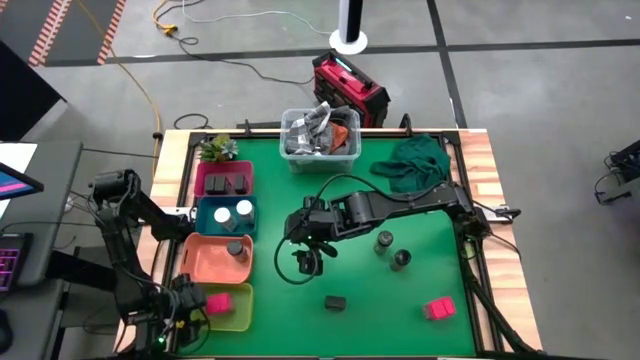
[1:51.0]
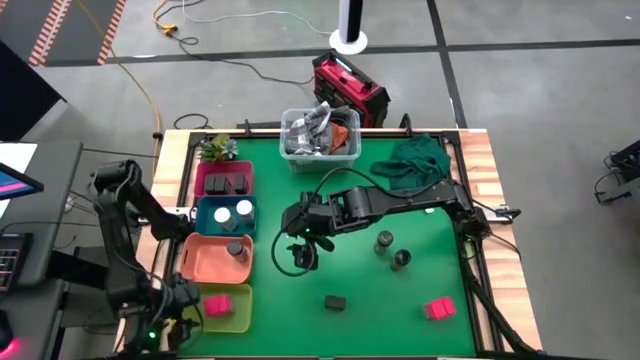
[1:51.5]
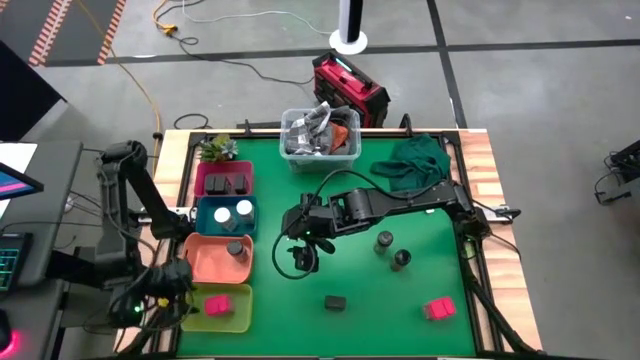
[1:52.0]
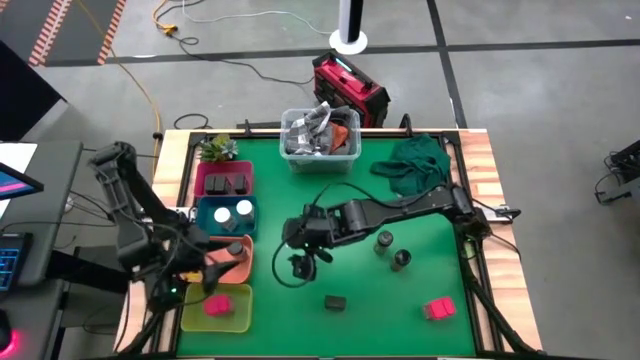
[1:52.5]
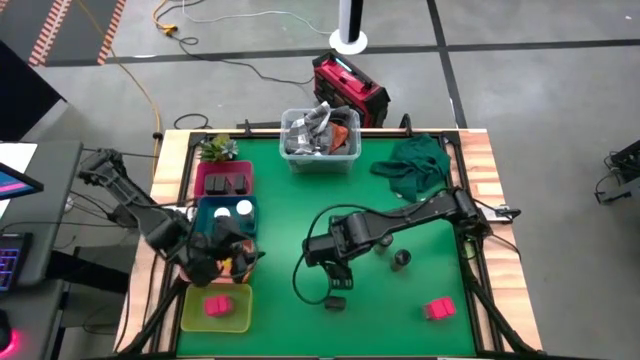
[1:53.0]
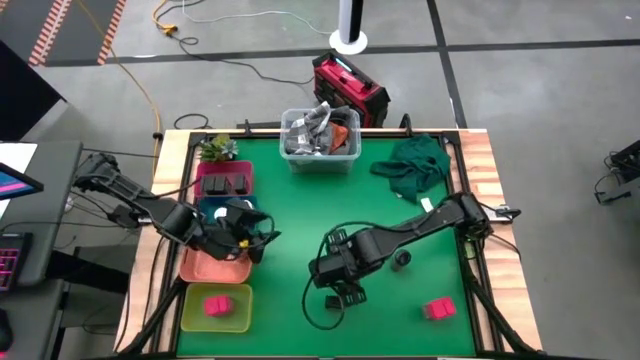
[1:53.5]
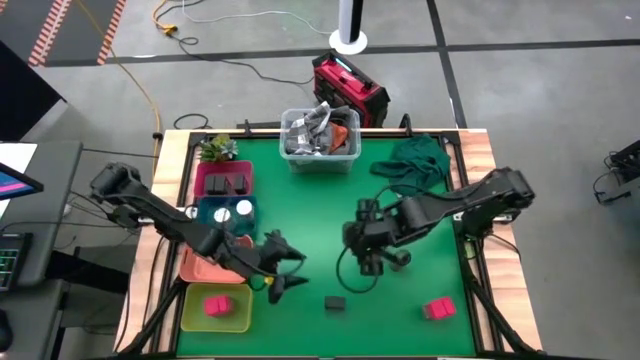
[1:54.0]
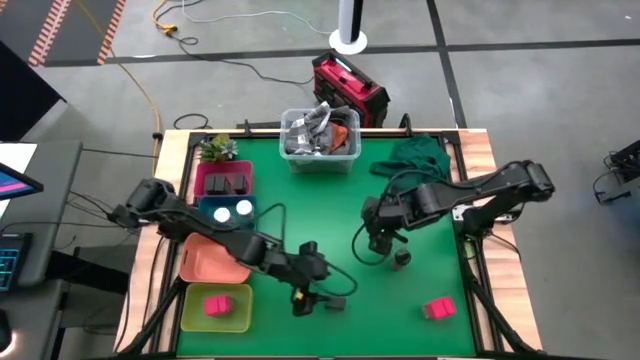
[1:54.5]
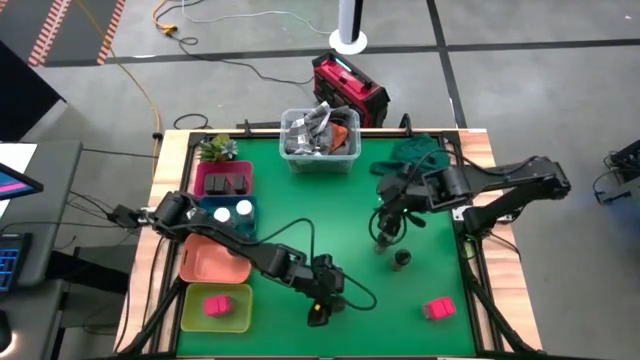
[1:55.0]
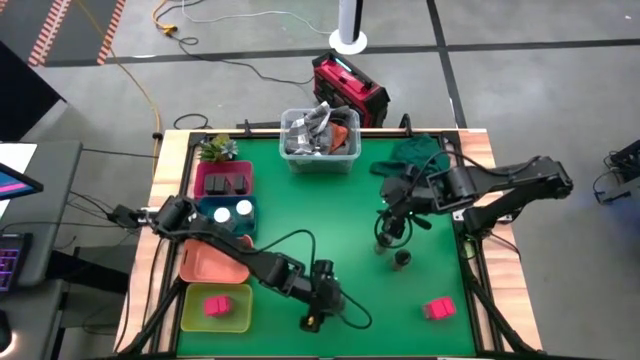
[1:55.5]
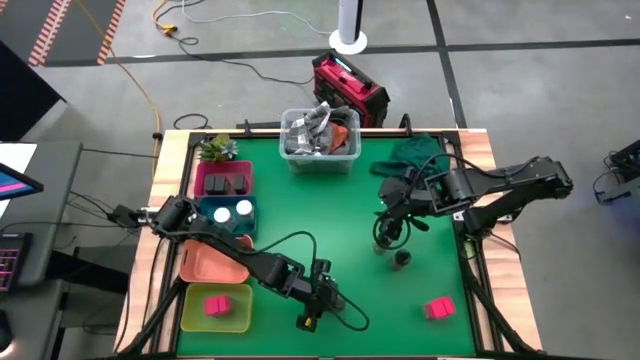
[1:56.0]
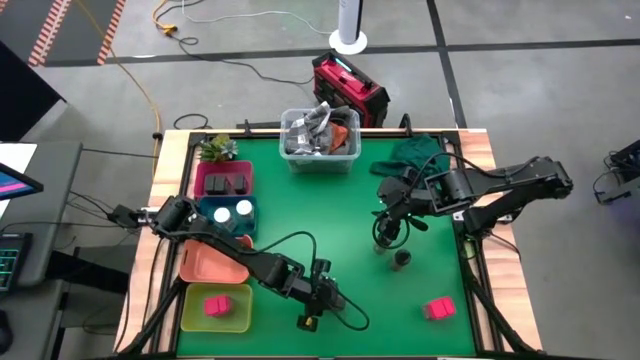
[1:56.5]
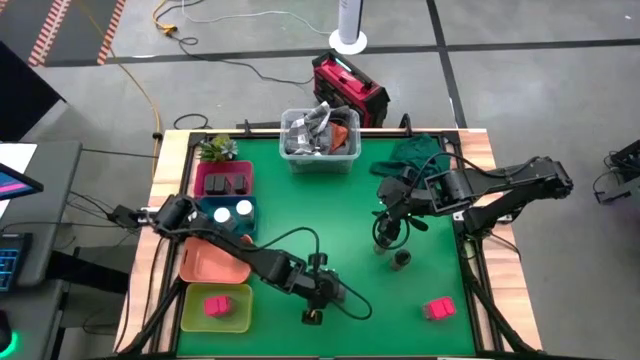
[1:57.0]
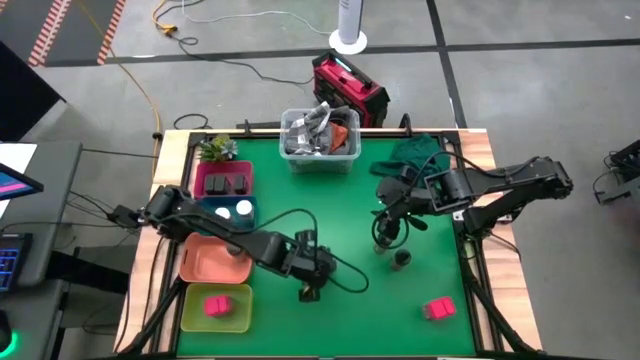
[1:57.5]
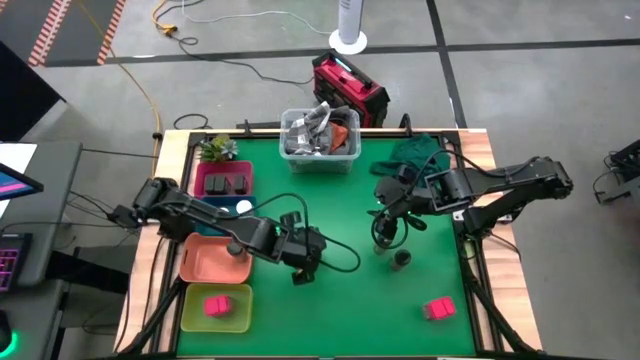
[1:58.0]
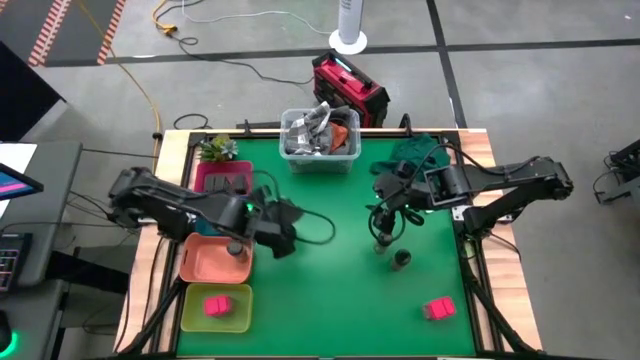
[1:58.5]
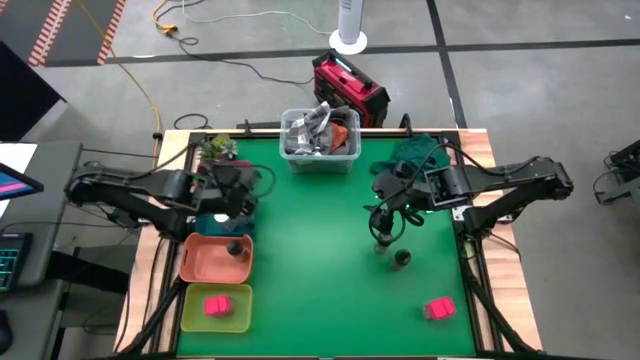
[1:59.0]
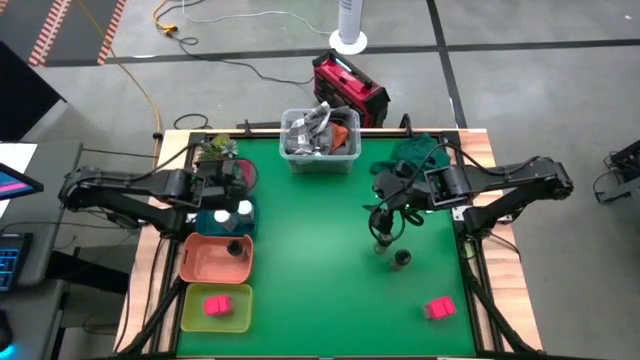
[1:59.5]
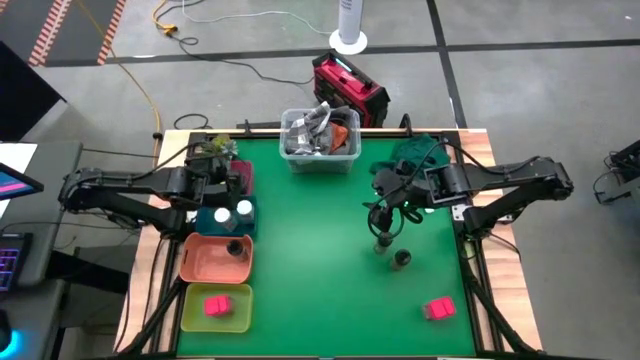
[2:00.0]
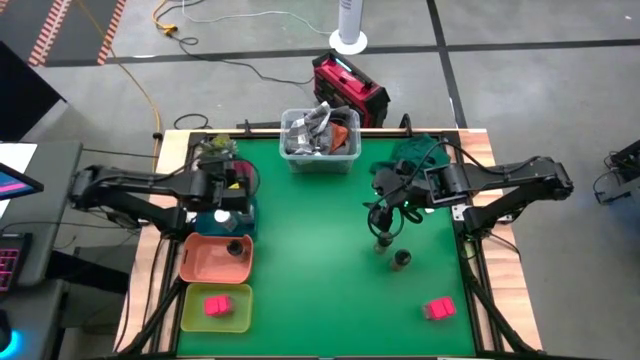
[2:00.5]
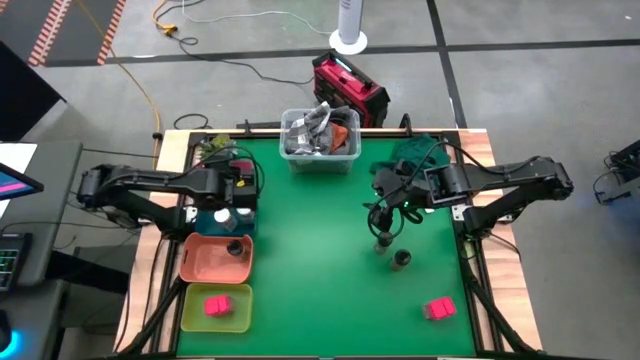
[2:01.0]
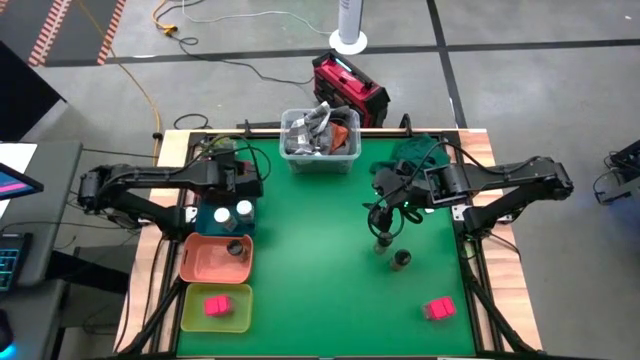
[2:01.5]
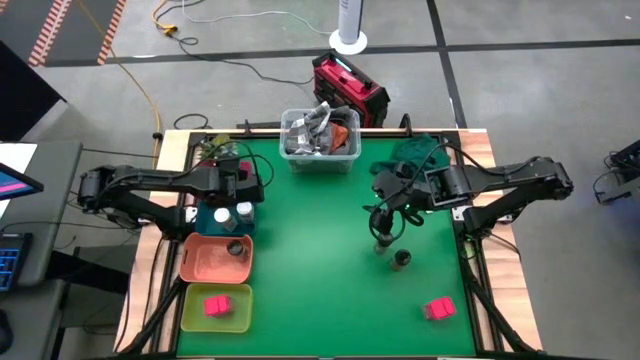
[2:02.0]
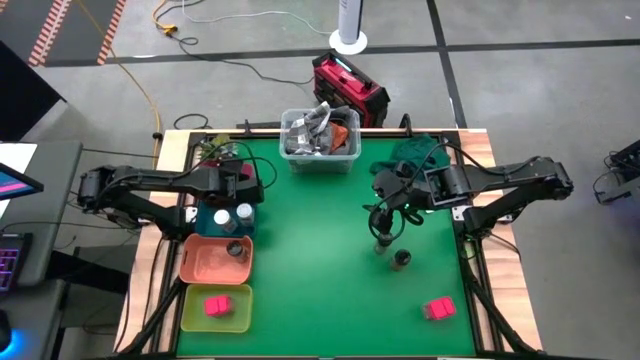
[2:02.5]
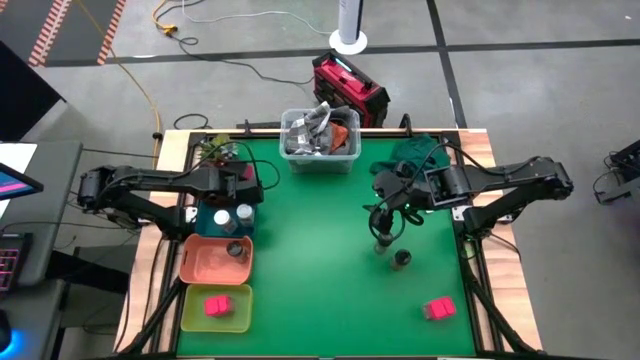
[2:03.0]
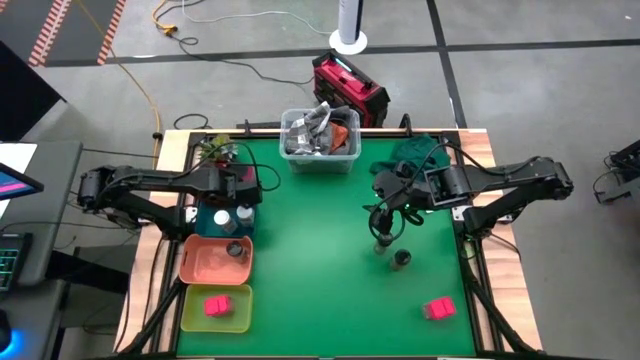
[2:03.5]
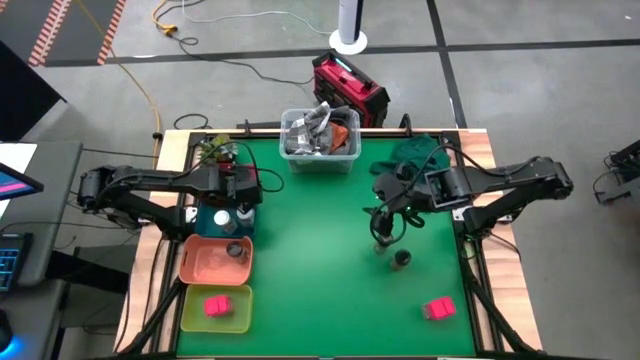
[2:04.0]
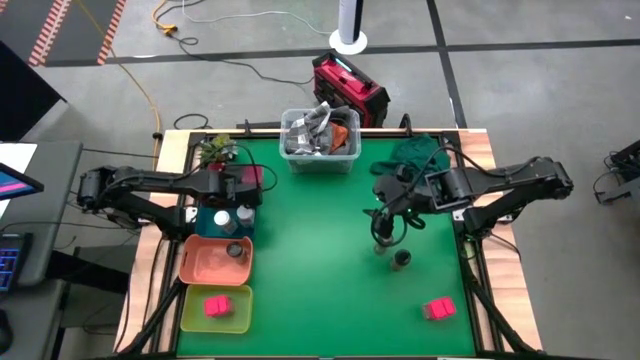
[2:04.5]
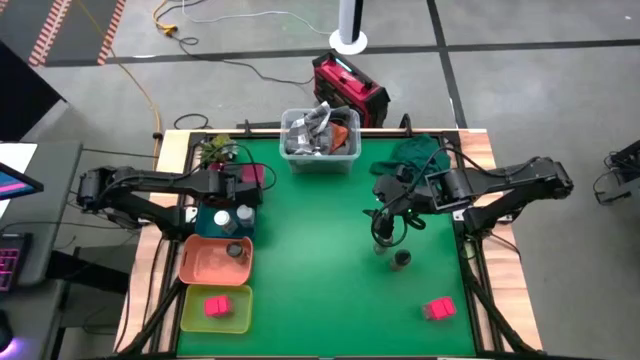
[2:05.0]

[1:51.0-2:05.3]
Task: Sort spices by type
Put the black seasoning can into the red bin

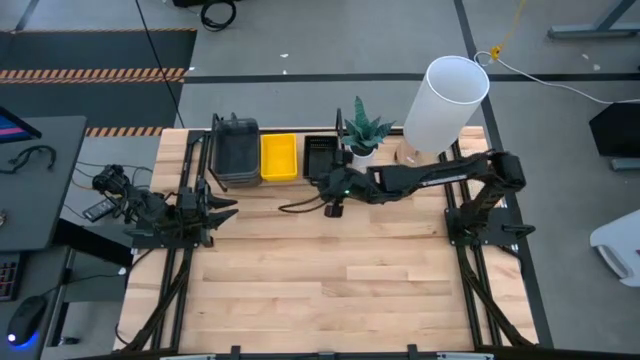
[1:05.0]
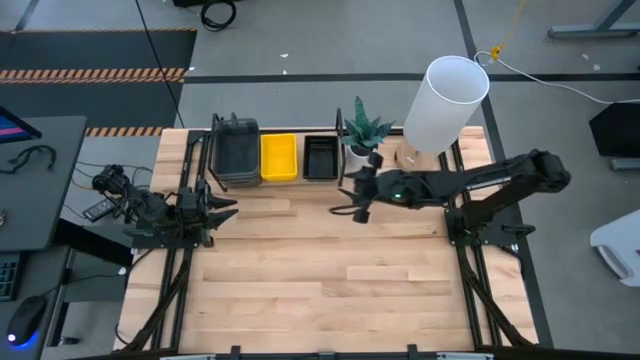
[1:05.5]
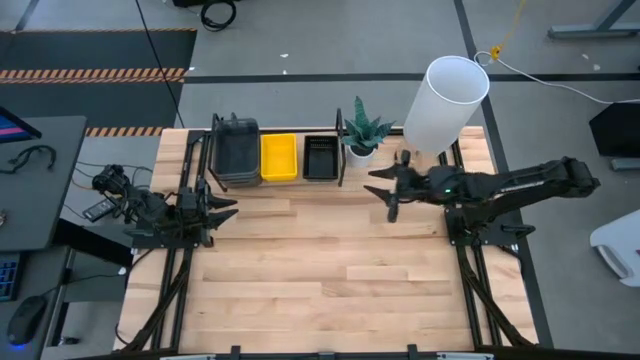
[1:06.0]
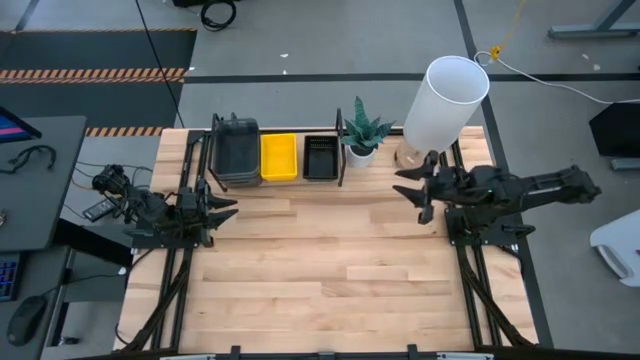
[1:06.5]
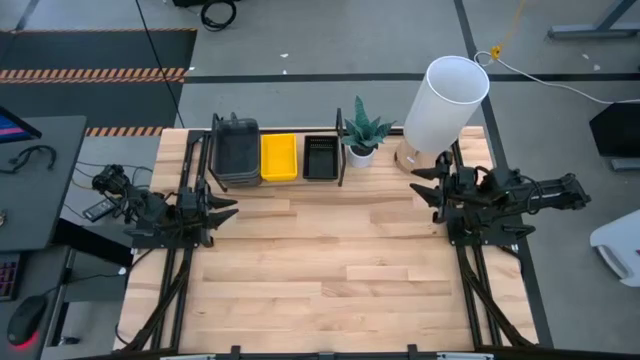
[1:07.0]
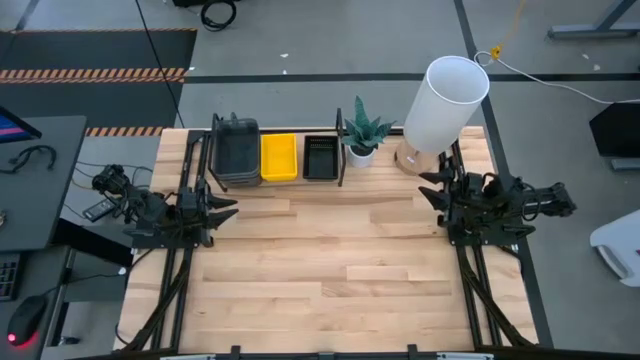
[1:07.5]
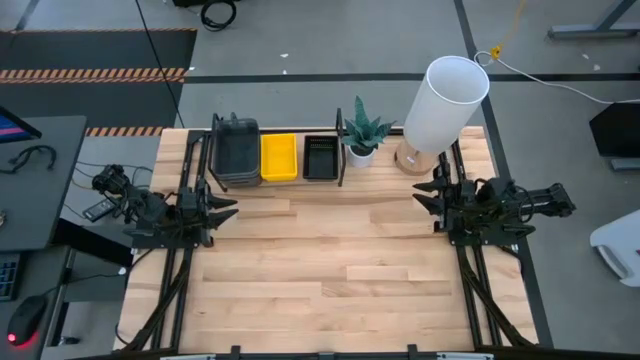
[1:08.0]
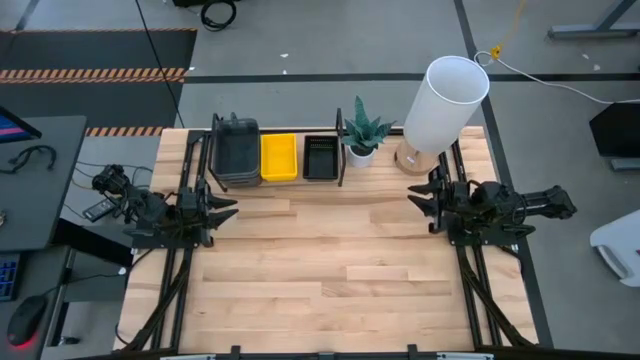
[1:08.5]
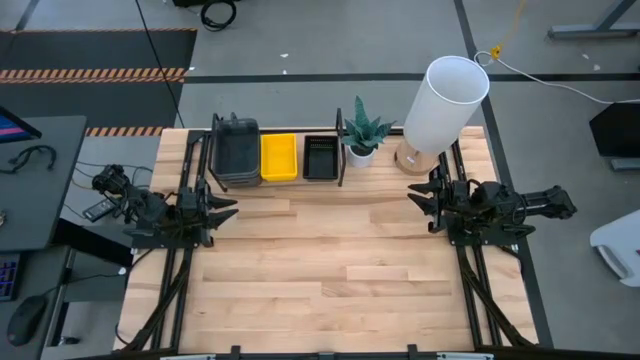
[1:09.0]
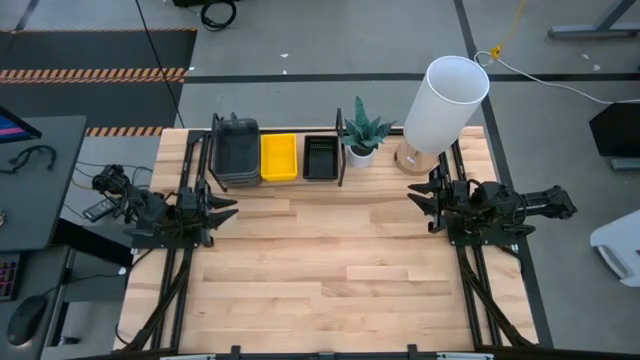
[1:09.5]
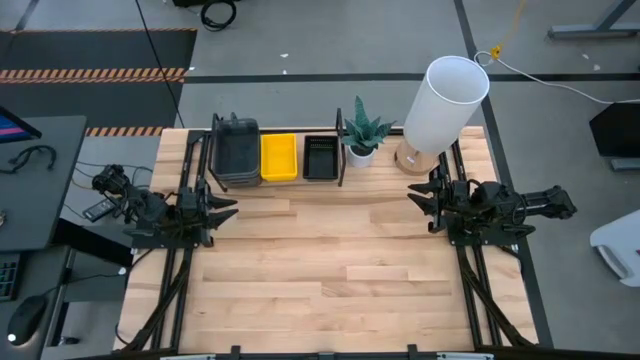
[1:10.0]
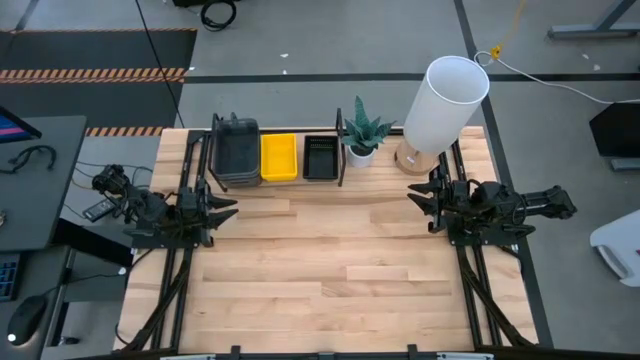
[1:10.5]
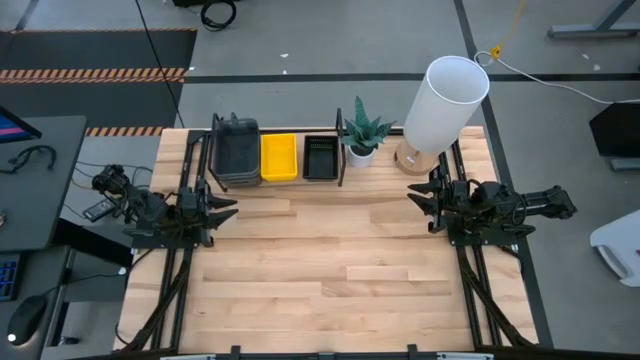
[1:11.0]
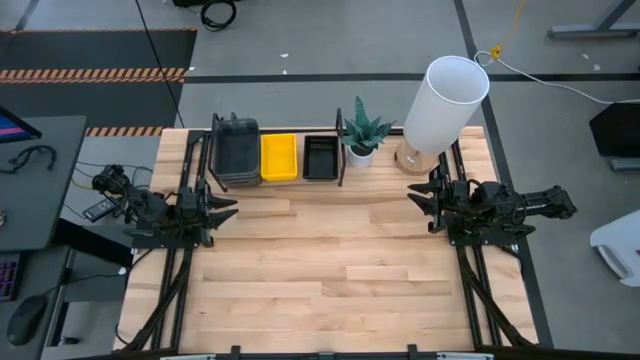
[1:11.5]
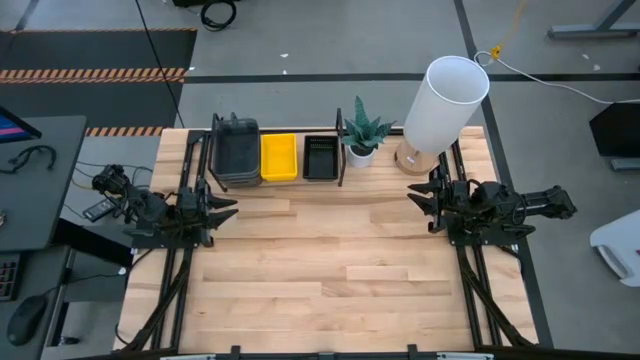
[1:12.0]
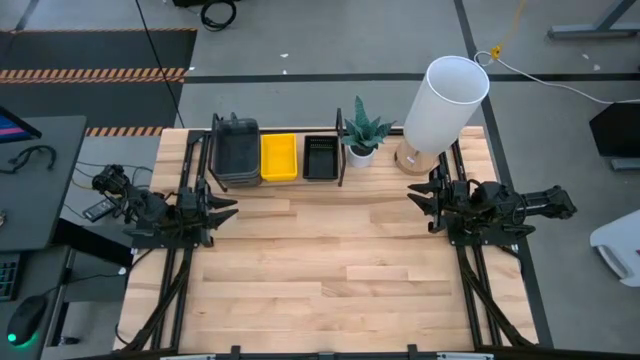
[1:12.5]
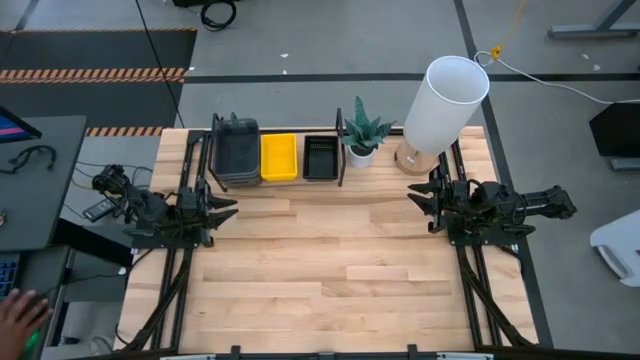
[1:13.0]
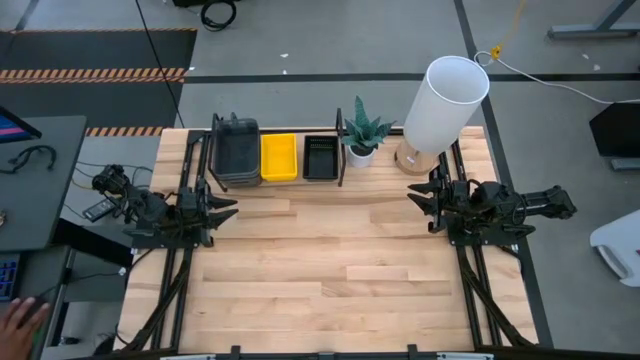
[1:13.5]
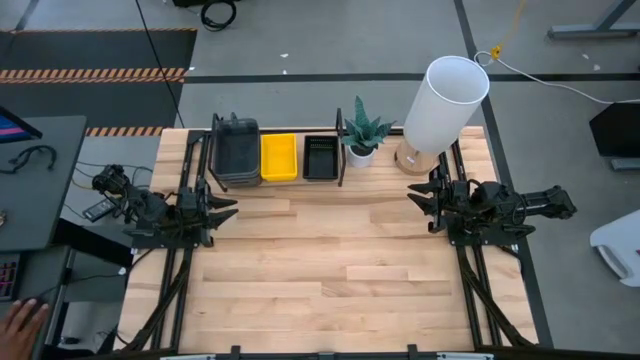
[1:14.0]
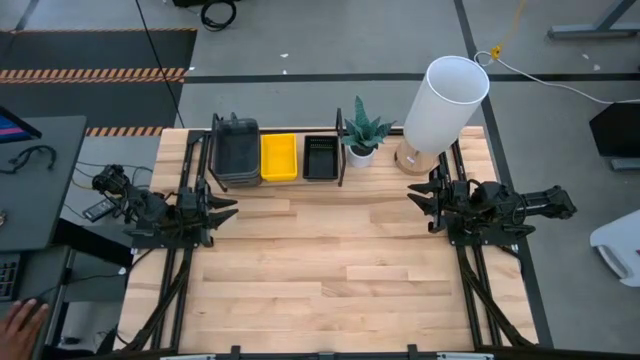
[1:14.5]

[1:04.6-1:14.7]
Task: Stack baskets on shelf by color
Return to Home Position
